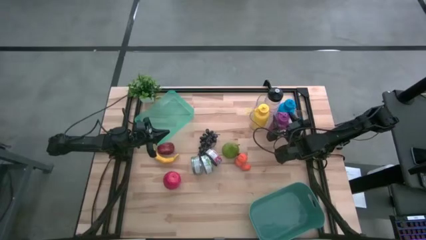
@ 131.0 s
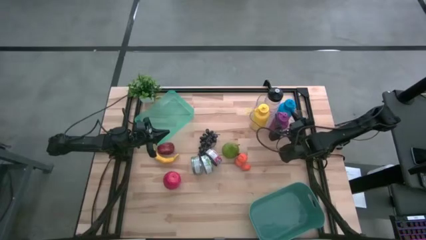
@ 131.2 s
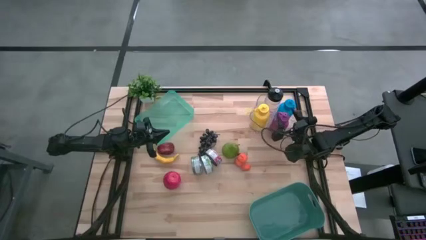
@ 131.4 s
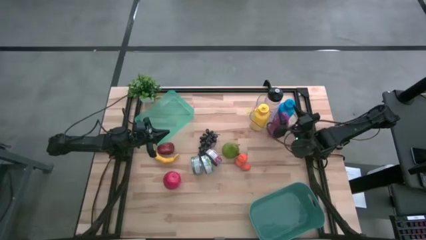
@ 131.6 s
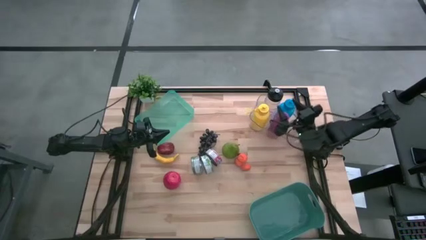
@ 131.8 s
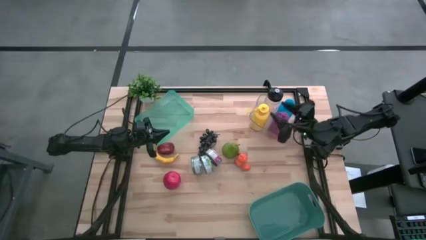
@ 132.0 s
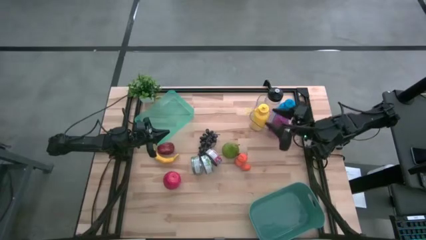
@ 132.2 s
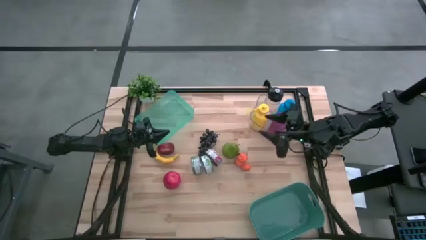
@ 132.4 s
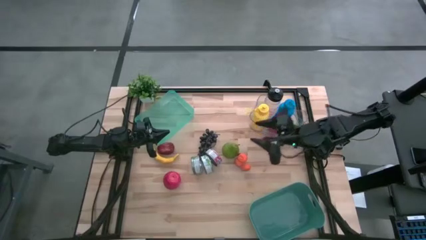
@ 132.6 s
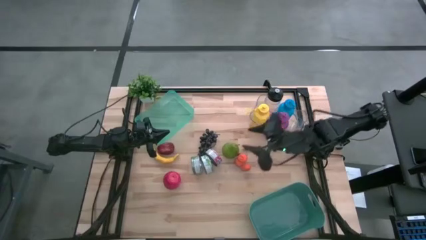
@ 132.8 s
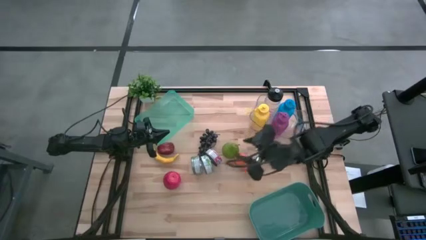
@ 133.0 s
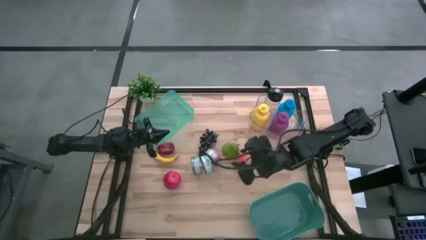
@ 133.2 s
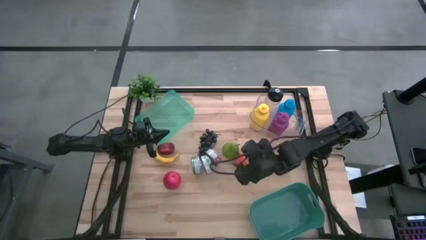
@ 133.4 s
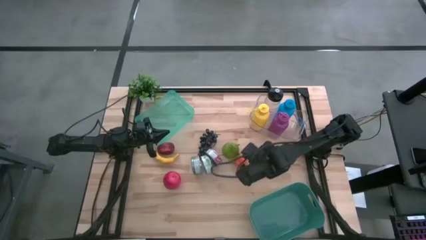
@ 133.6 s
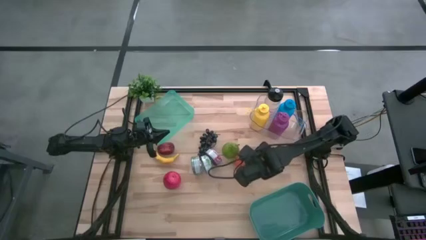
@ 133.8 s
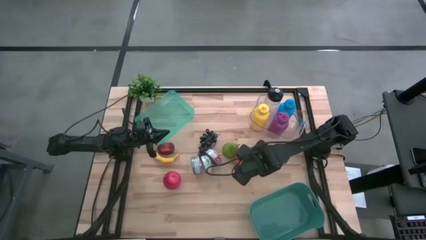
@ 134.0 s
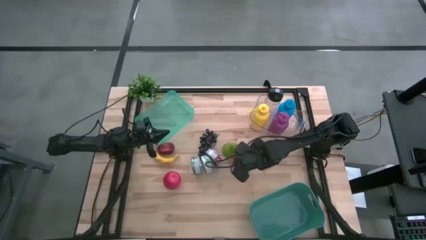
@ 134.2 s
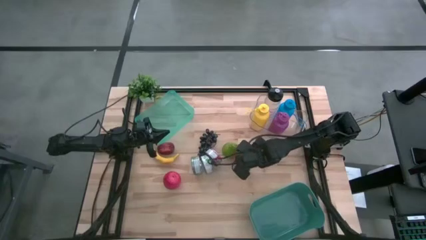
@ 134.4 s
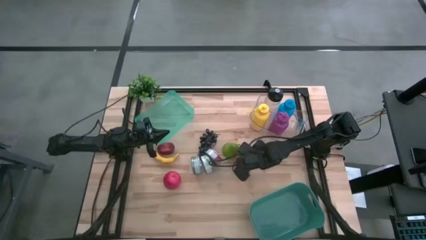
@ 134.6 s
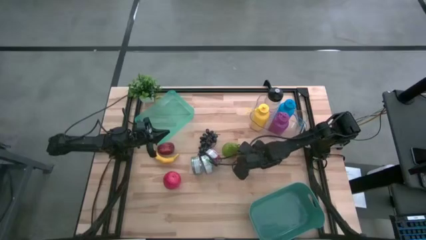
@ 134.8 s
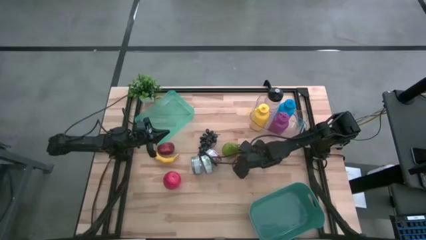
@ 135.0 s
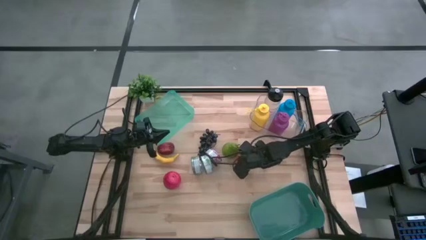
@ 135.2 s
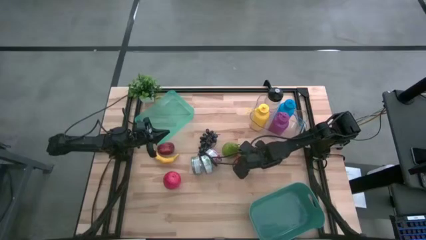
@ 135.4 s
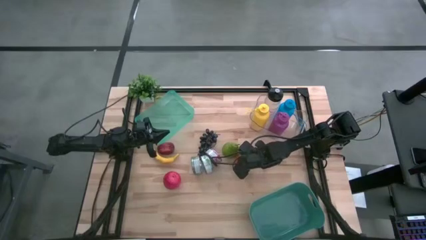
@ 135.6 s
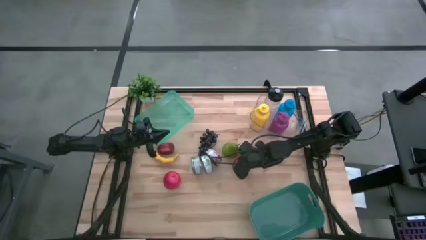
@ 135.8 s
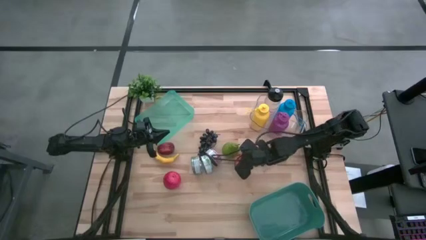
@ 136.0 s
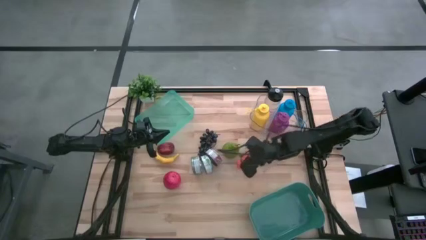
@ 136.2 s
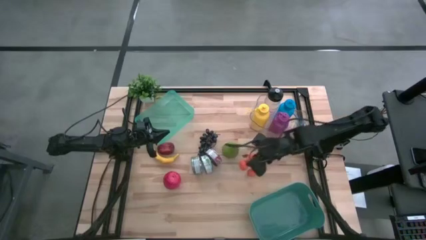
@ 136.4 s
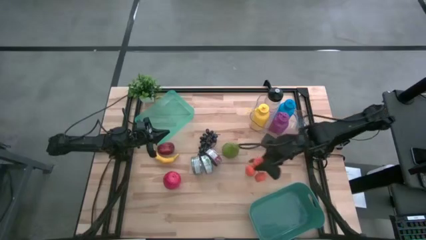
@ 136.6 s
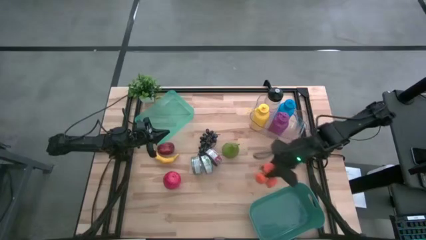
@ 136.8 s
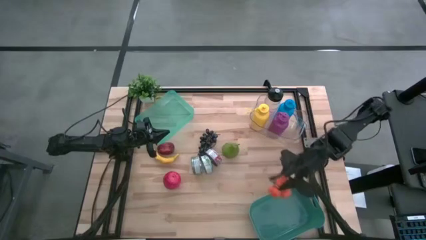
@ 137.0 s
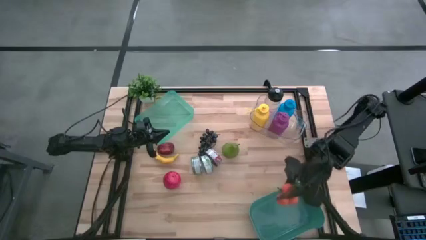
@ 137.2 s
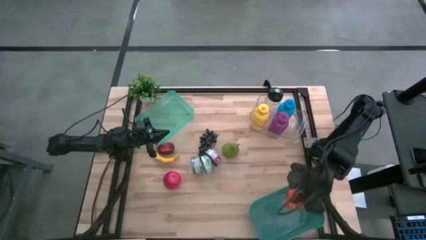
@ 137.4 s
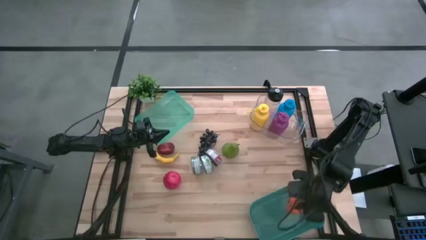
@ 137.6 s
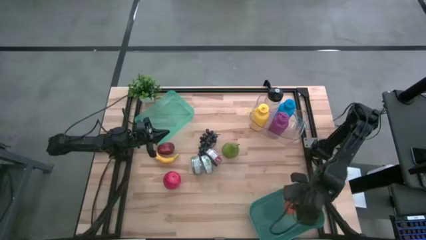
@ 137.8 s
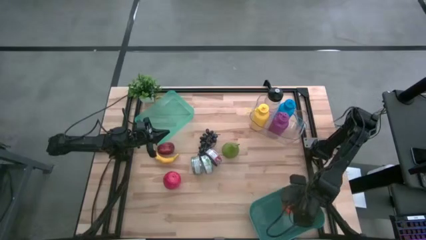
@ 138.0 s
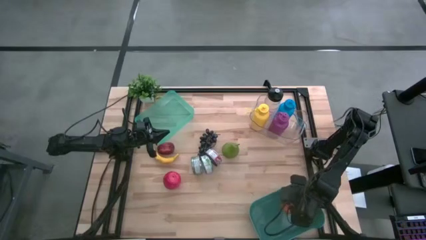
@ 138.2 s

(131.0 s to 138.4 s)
Task: Pick & Place Food Item
Put the orange tangerines into the dark green bin

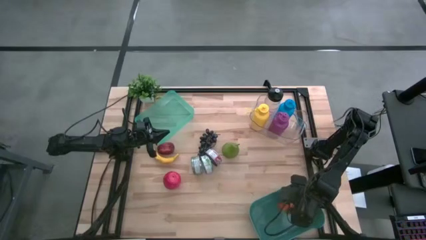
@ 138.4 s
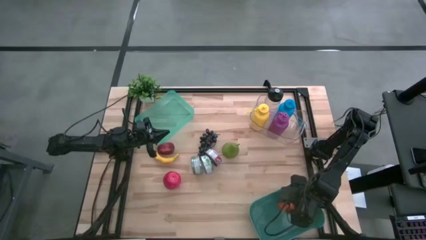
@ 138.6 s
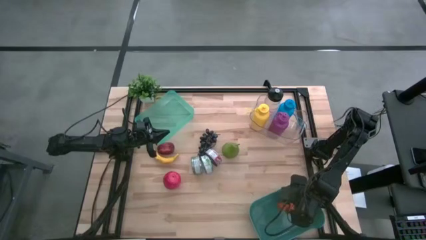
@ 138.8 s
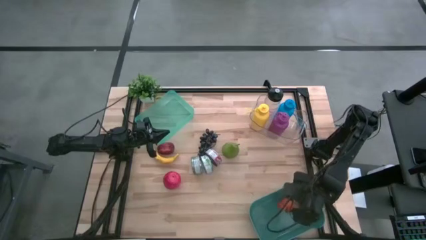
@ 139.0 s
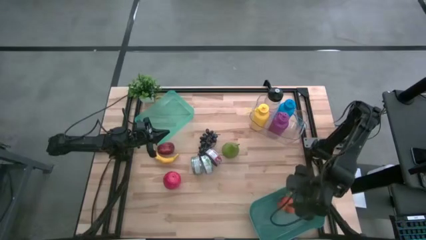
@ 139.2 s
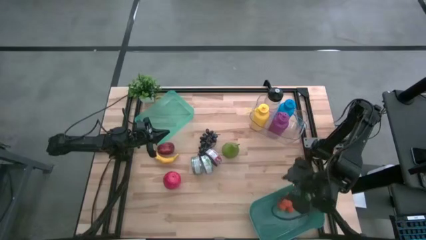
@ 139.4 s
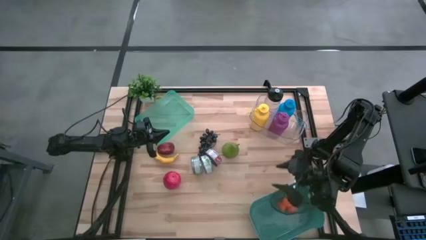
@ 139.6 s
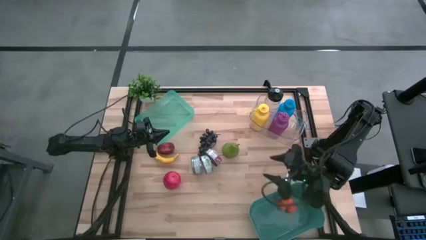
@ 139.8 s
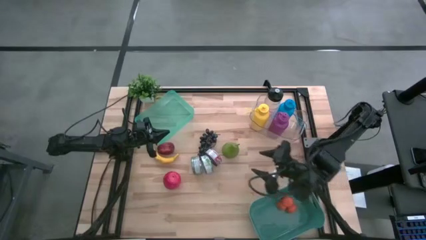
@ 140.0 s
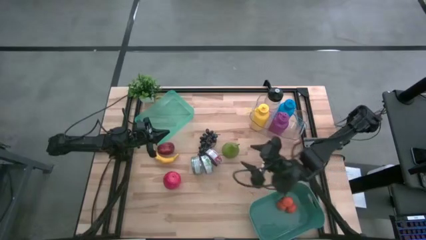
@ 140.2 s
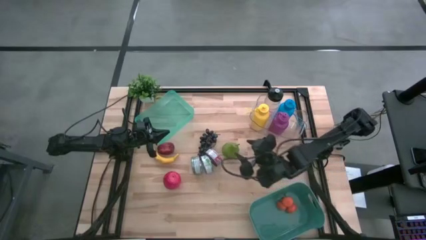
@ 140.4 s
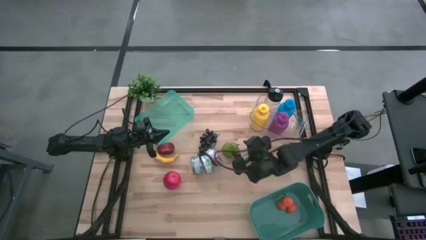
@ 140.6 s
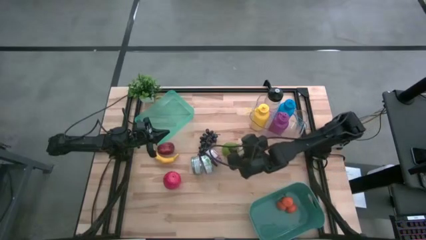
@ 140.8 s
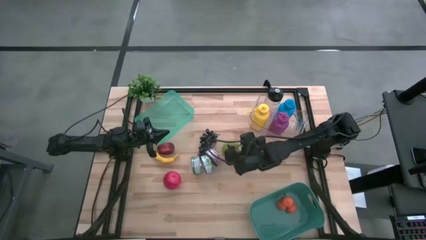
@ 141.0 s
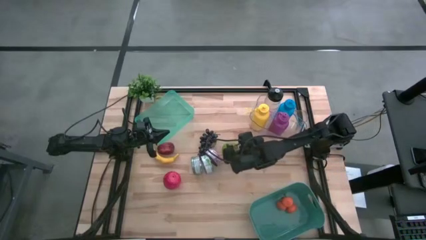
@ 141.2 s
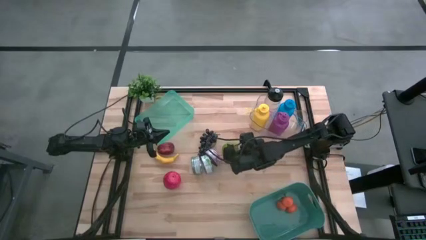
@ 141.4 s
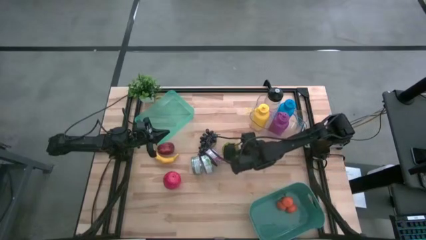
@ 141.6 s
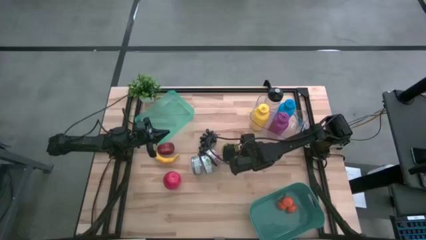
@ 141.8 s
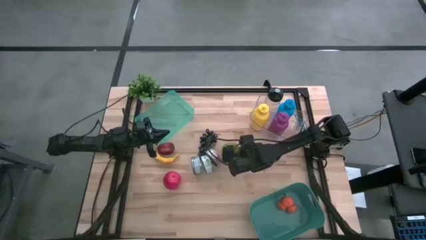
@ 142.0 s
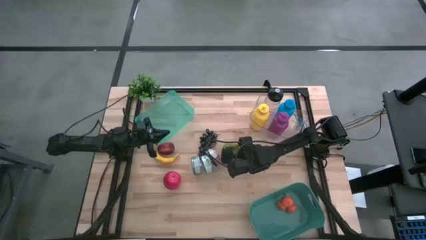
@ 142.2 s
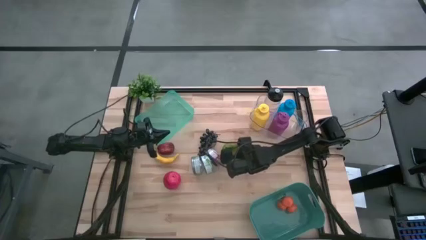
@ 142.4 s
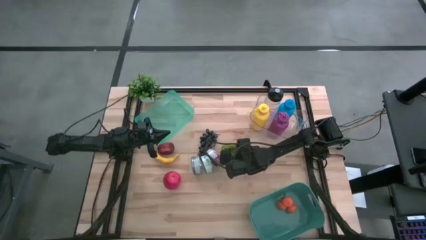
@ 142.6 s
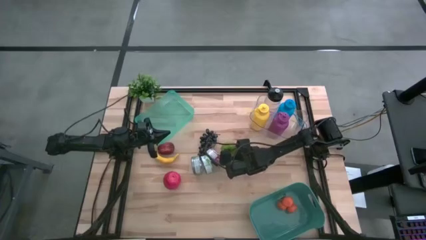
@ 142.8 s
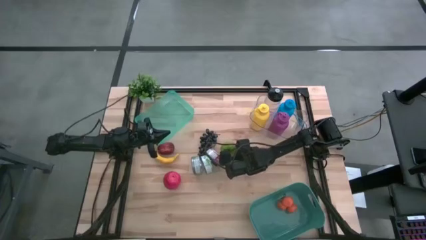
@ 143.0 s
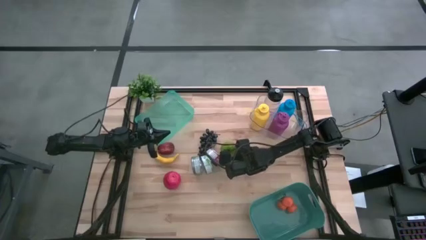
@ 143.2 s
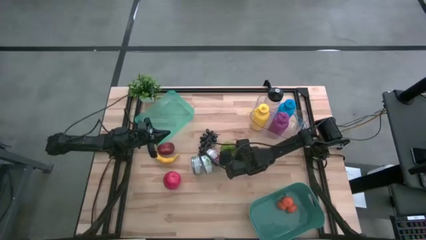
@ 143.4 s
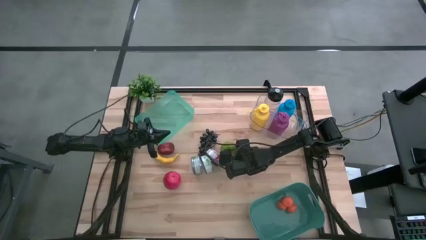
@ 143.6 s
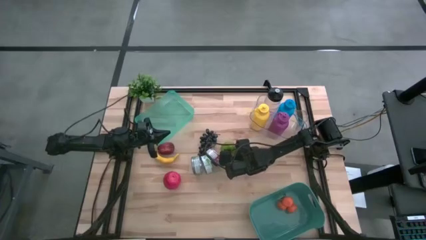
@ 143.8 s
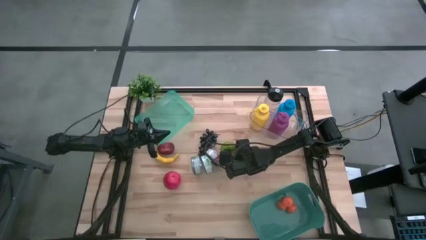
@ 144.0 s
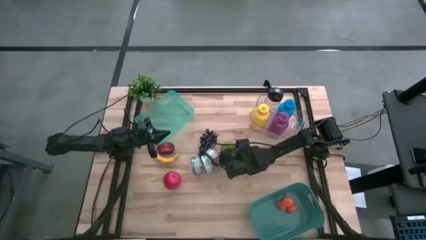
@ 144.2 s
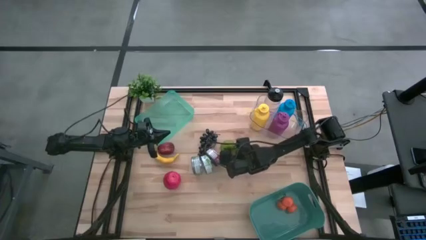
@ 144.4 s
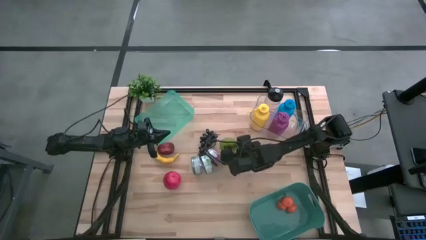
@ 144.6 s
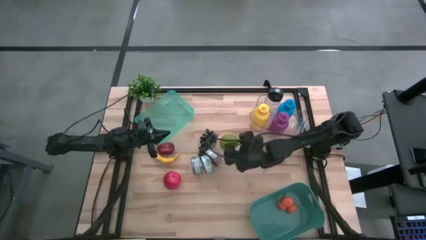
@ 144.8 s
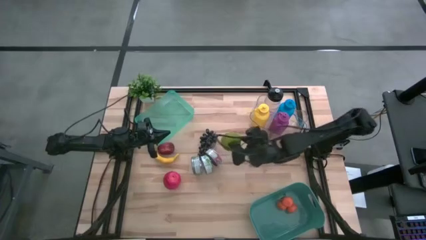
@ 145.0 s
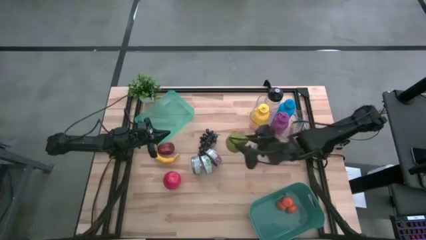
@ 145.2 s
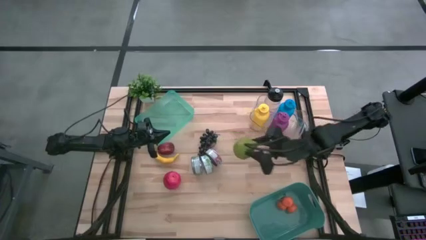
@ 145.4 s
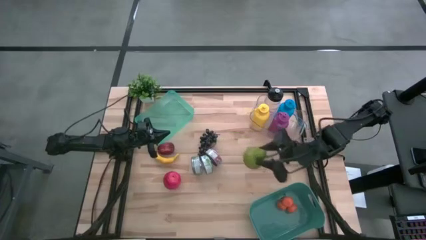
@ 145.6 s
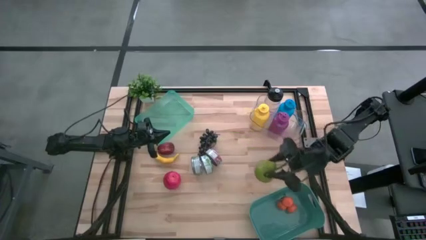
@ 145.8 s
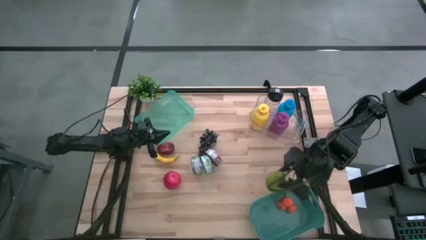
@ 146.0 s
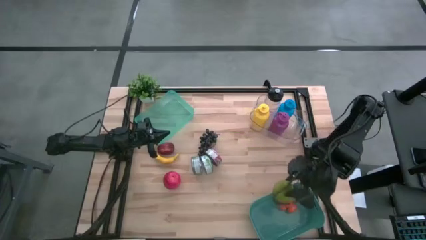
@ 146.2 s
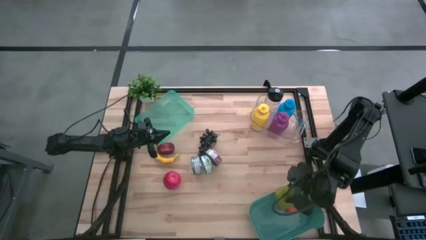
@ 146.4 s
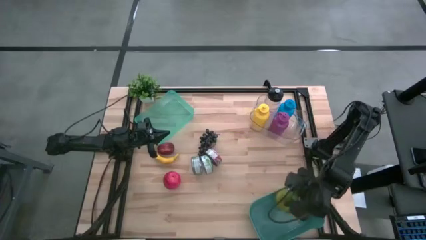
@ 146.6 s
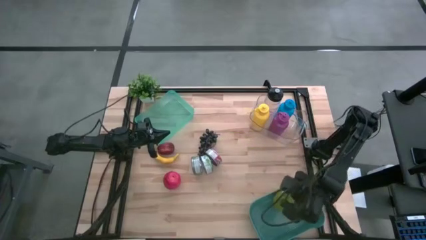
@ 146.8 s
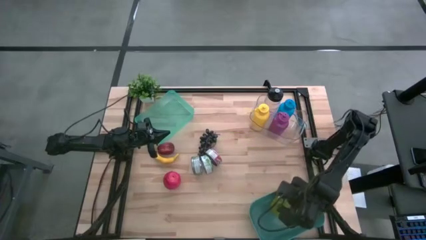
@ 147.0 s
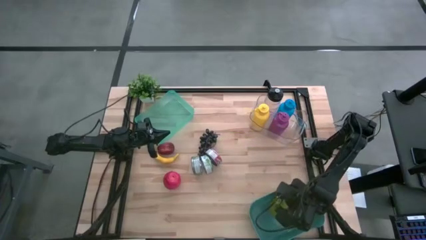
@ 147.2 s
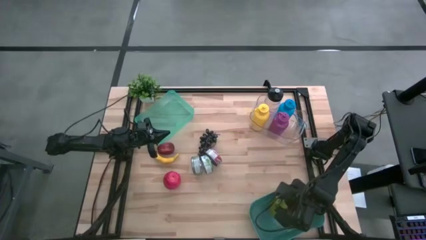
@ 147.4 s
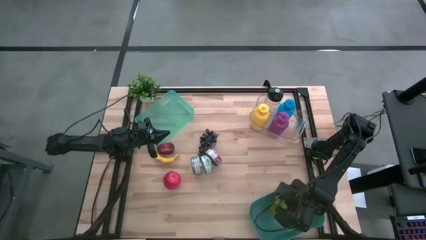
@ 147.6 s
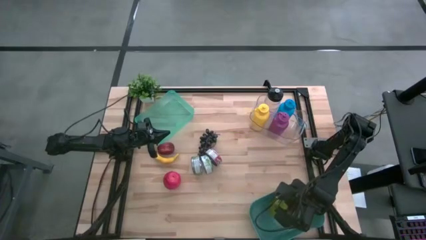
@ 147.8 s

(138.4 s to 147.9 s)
Put the green pear into the dark green bin
